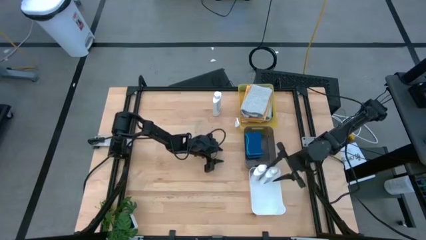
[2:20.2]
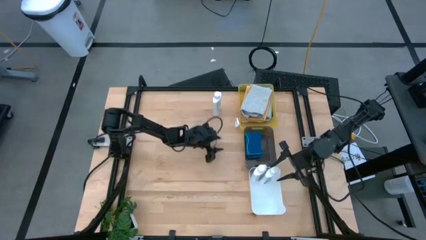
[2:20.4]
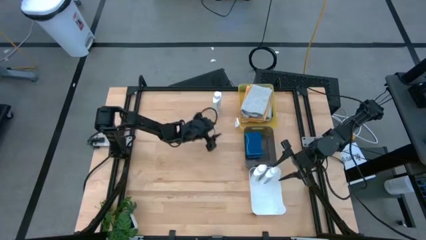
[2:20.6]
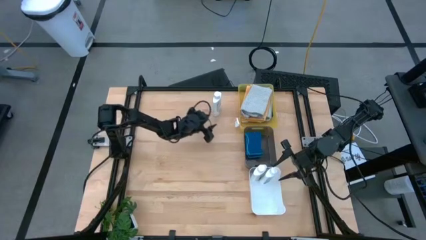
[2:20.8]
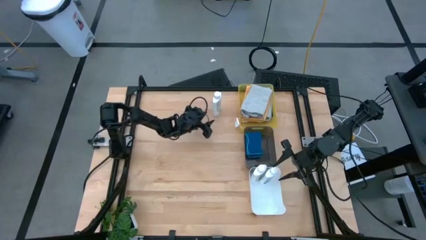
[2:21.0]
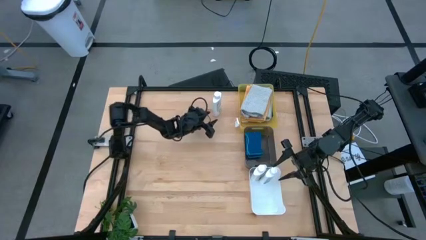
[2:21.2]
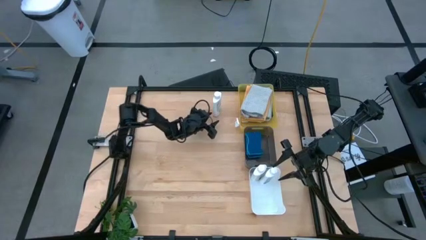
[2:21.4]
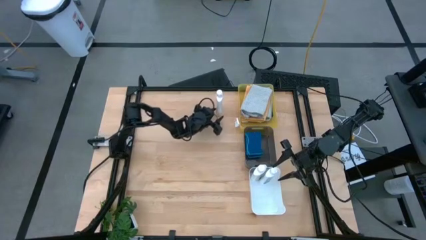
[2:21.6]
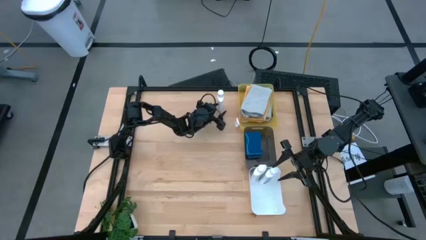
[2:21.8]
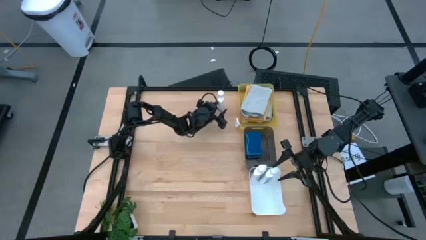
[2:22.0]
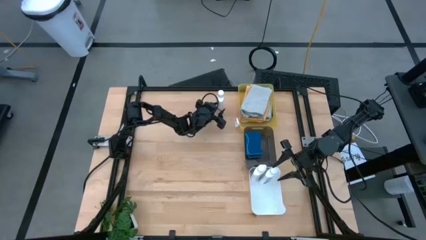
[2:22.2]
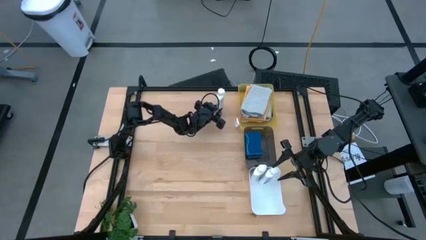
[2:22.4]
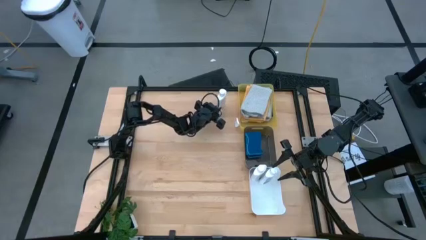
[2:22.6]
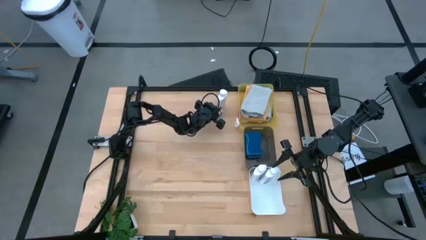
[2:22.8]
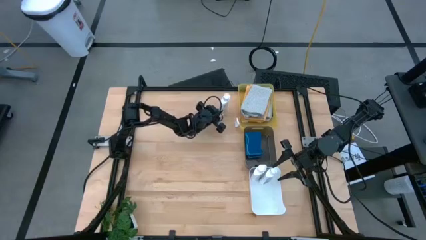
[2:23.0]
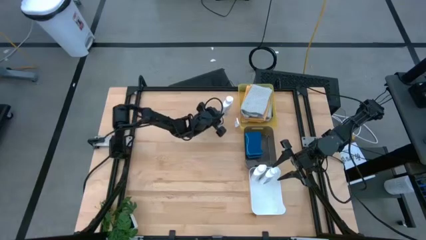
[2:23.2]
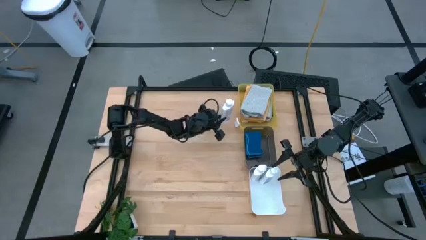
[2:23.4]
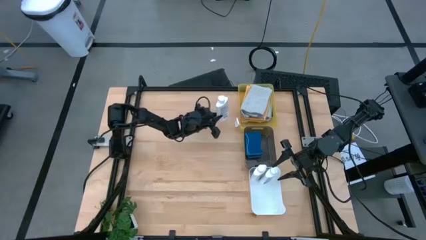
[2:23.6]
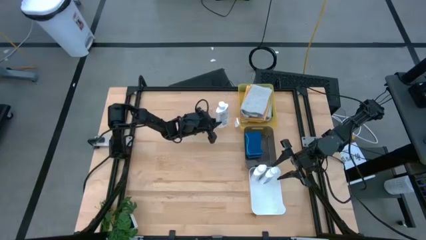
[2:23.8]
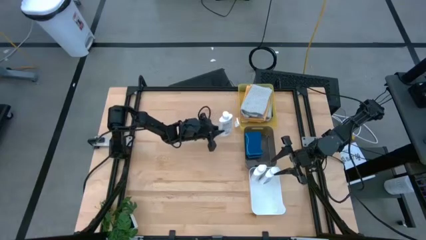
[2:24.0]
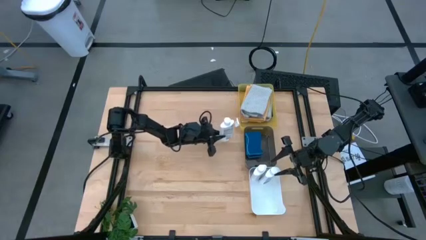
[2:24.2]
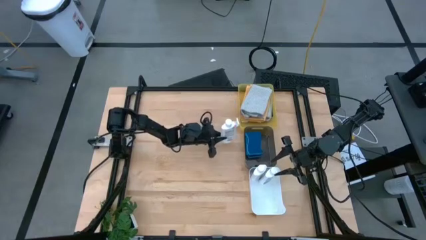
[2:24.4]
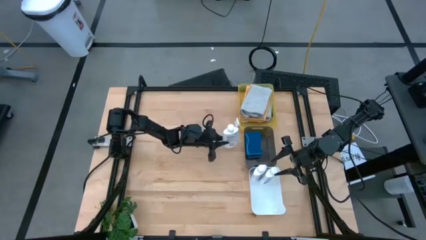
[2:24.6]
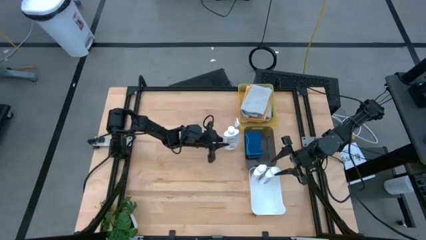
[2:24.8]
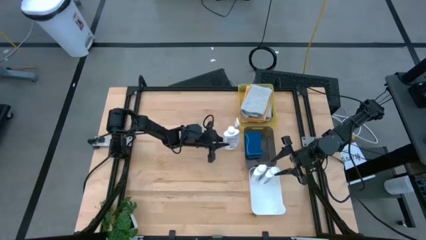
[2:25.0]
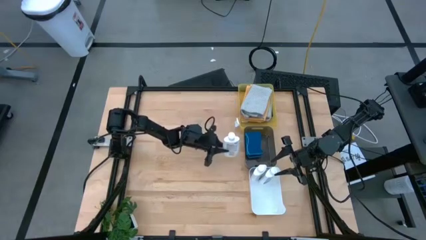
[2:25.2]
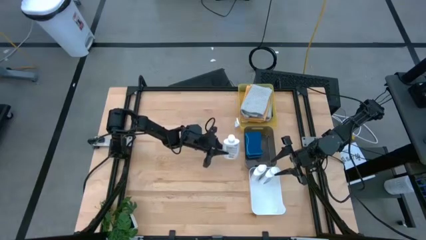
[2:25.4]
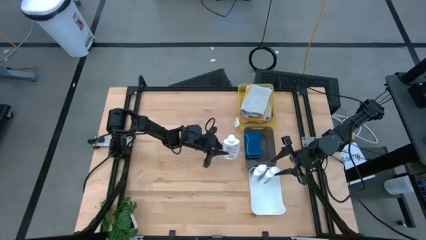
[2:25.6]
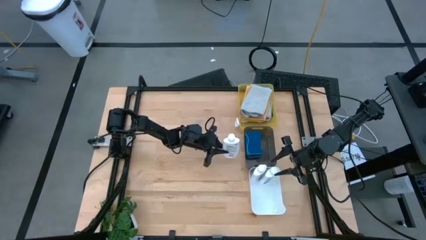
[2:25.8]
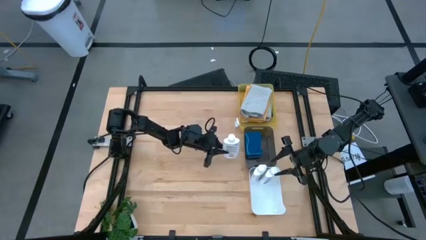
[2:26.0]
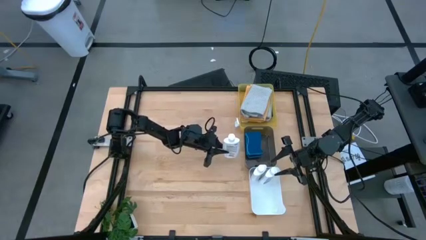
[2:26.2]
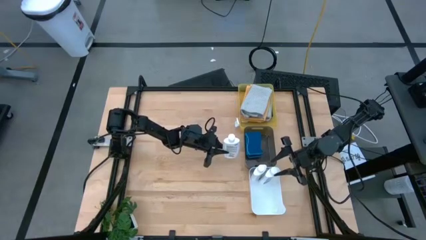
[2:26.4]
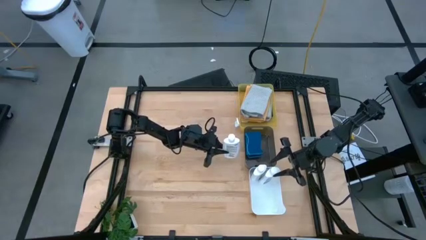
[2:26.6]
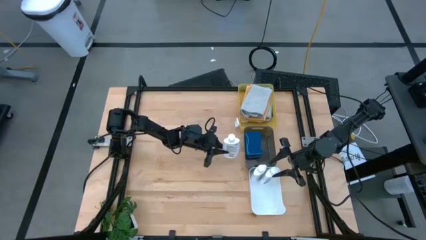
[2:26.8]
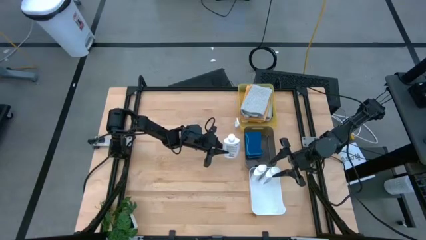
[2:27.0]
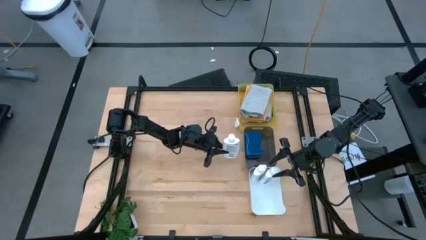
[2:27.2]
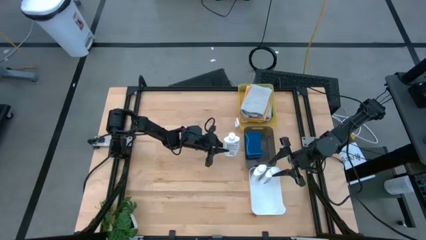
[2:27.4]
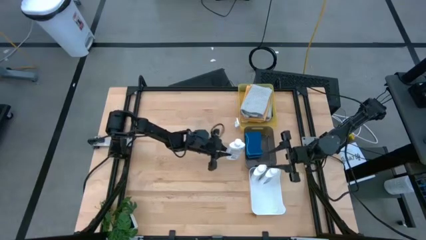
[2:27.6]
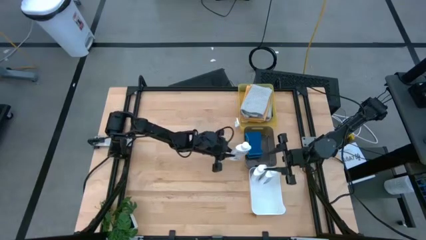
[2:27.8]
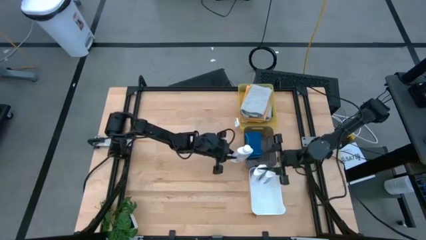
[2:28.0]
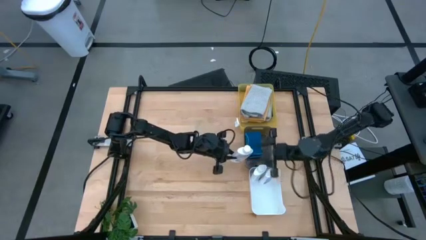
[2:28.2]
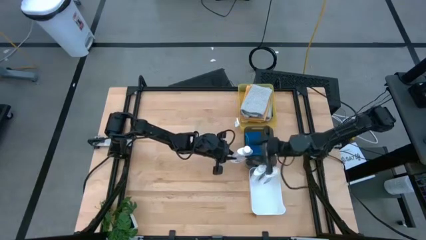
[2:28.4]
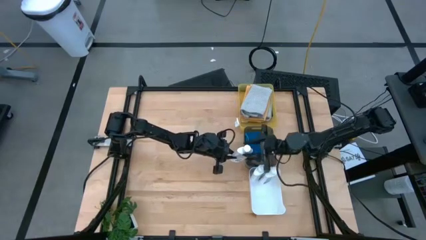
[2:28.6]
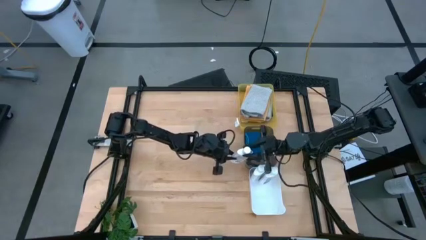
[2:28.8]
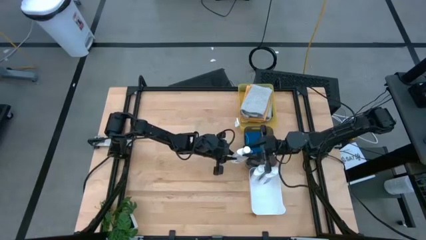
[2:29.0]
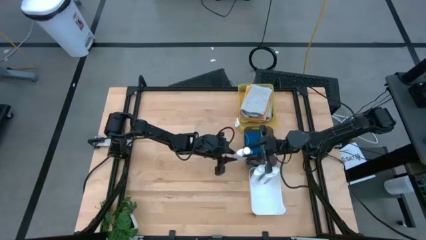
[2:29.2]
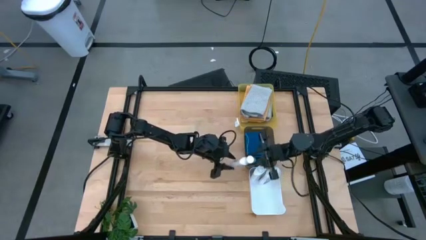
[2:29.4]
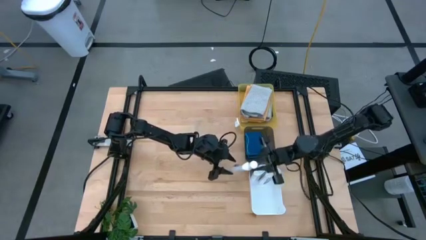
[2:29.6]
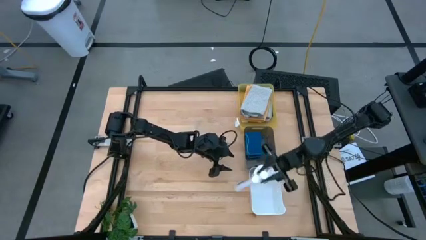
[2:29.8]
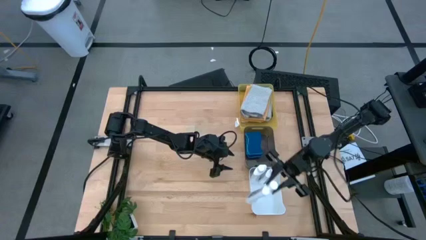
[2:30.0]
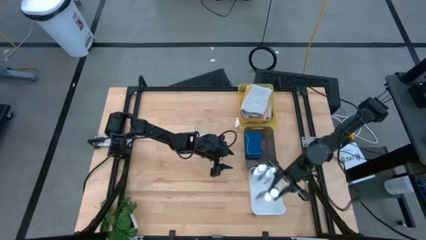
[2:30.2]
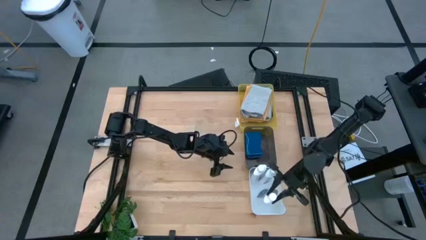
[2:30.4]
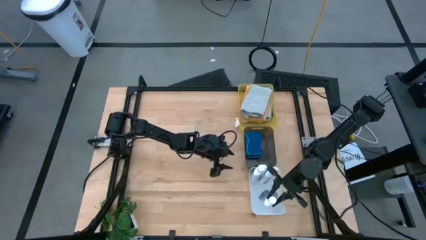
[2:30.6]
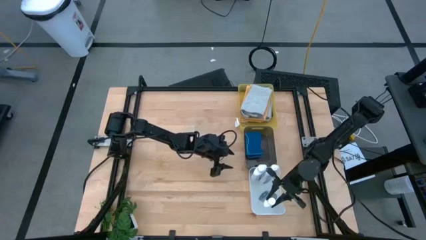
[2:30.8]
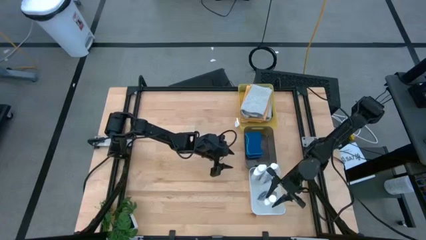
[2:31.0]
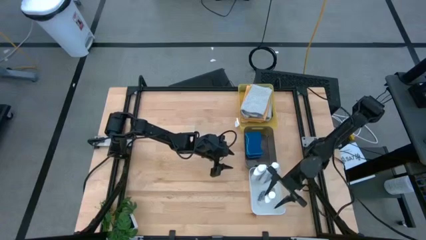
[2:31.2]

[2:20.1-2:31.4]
Task: Pick & Place Kitchen Items
Put the white plastic restorer bottle into the white bin

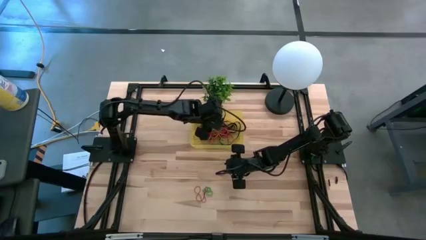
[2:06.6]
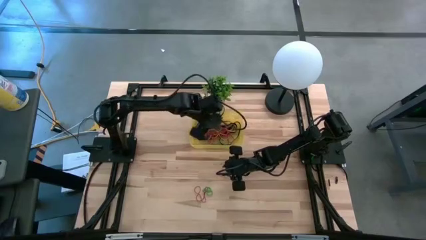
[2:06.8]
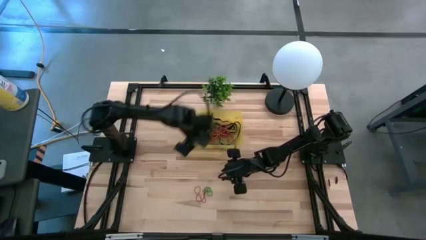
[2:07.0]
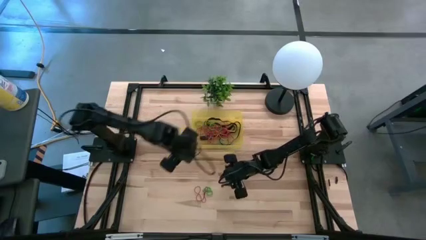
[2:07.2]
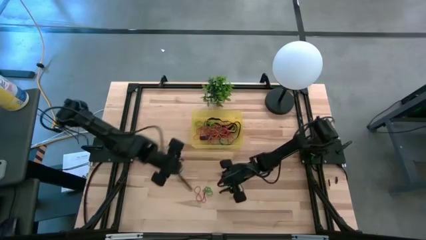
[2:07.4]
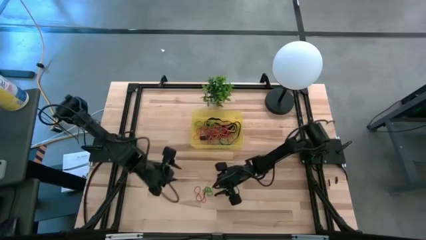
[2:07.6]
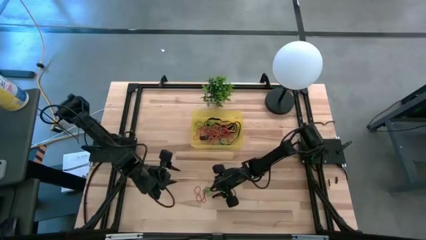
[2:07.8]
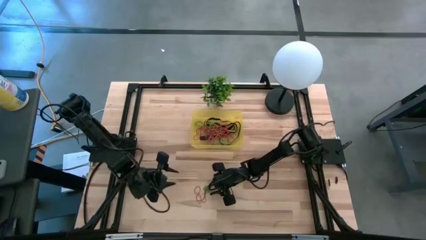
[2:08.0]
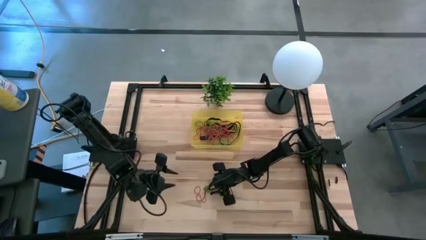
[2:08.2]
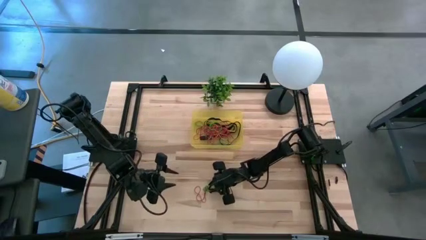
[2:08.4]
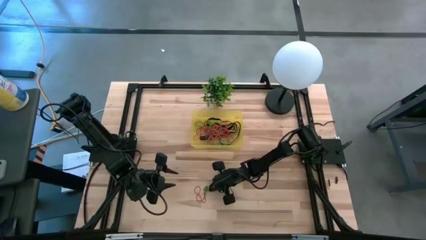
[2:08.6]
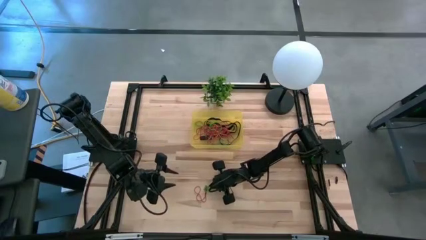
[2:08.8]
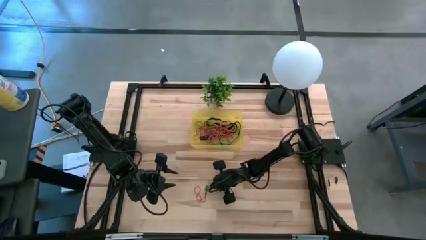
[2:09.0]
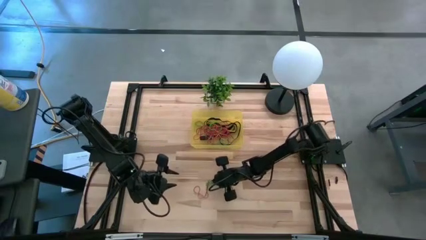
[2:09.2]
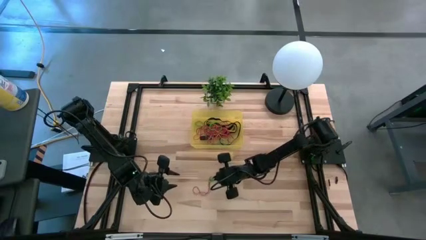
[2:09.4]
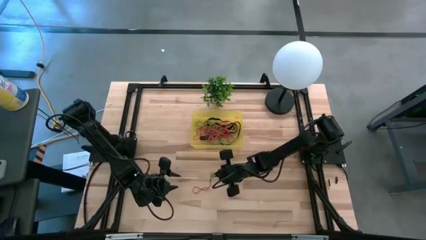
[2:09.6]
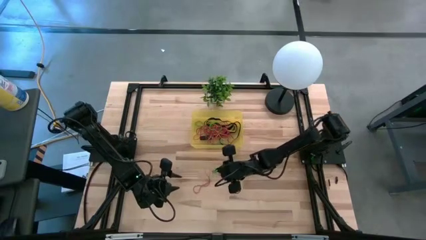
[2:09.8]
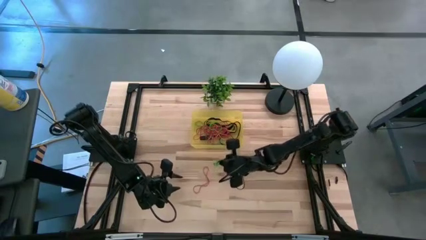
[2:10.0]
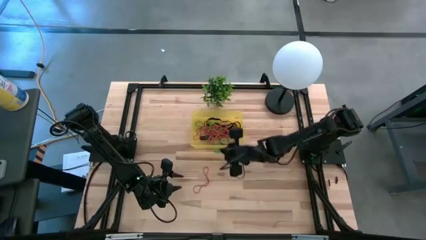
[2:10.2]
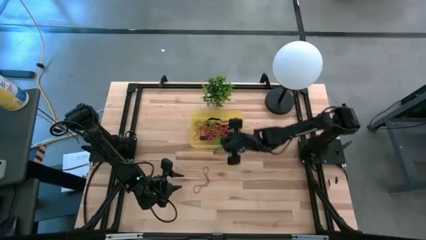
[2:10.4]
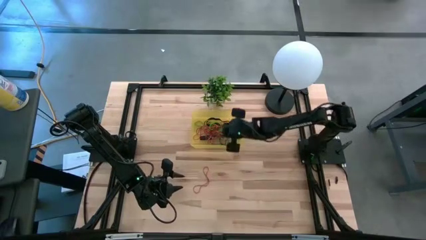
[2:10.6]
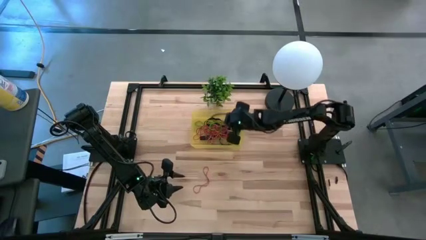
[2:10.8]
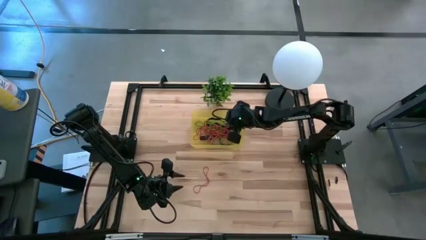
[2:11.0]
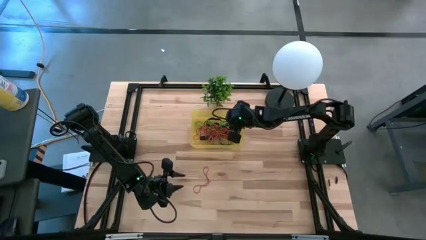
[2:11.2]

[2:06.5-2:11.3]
Task: Pick and place rubber bands into bin
Put the green rubber band into the yellow bin
